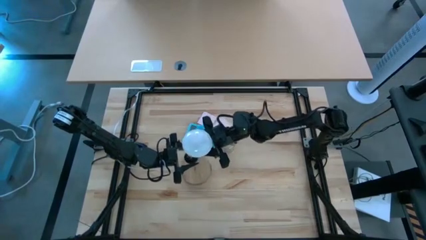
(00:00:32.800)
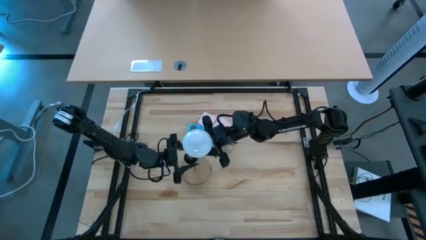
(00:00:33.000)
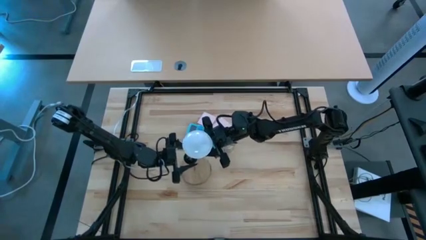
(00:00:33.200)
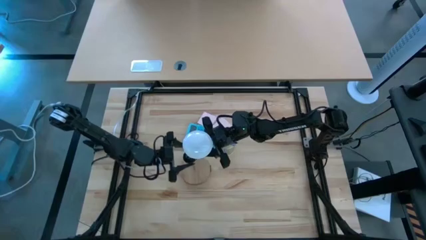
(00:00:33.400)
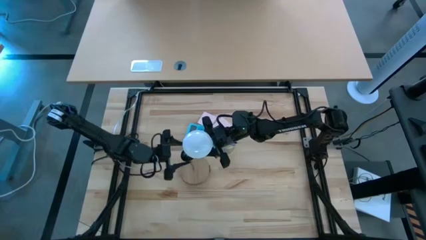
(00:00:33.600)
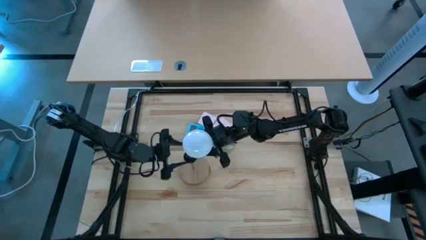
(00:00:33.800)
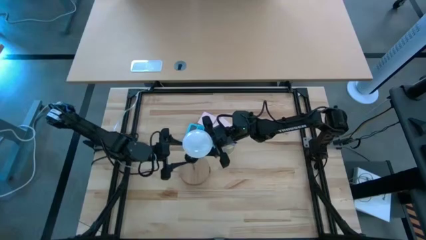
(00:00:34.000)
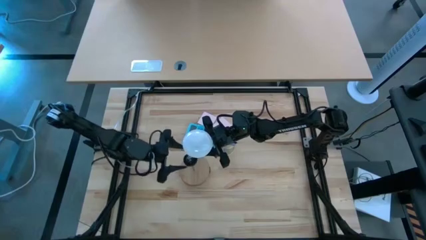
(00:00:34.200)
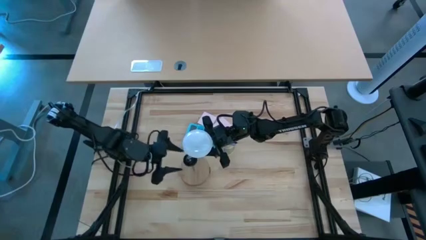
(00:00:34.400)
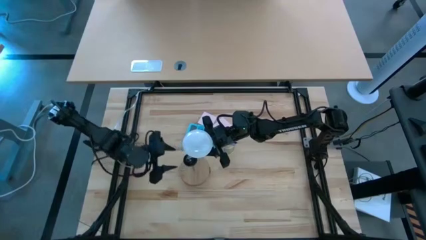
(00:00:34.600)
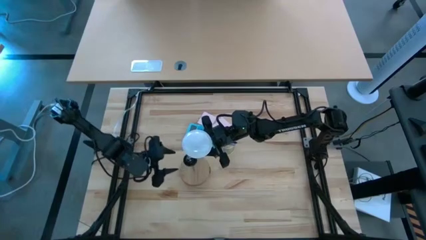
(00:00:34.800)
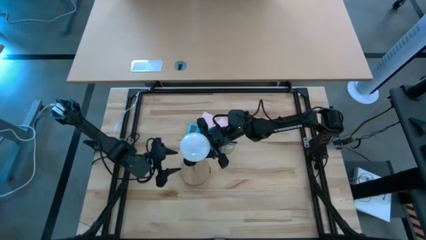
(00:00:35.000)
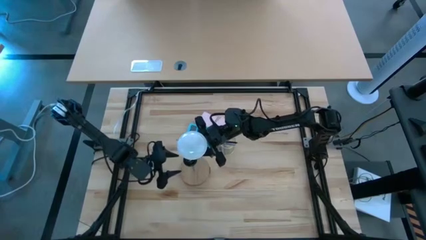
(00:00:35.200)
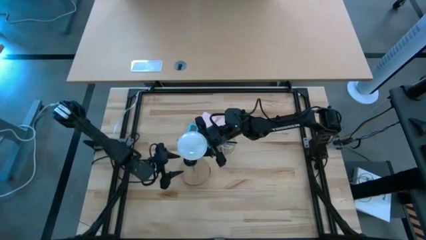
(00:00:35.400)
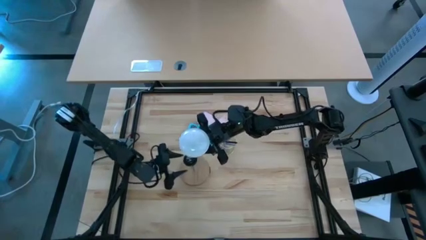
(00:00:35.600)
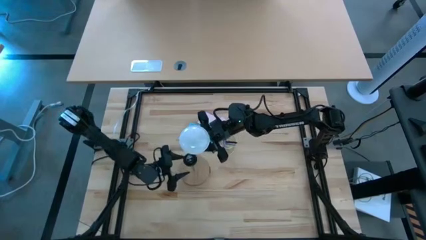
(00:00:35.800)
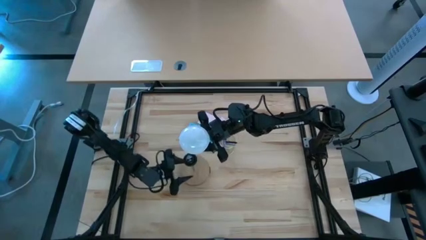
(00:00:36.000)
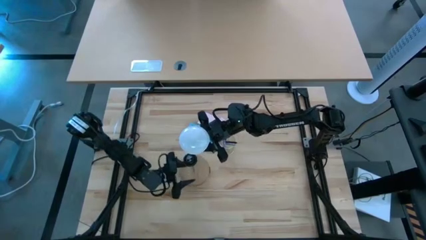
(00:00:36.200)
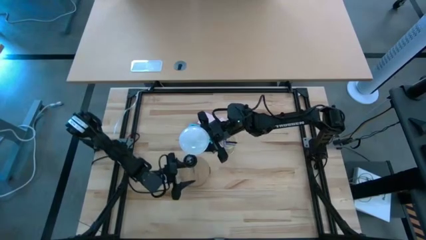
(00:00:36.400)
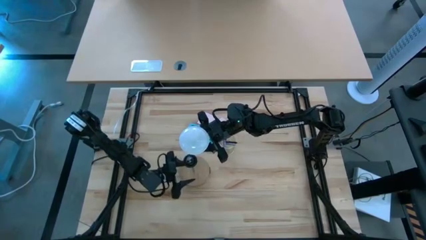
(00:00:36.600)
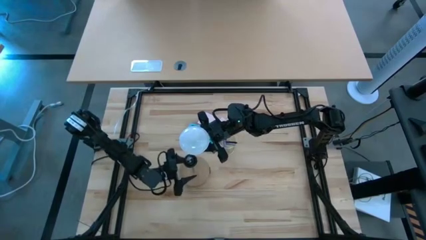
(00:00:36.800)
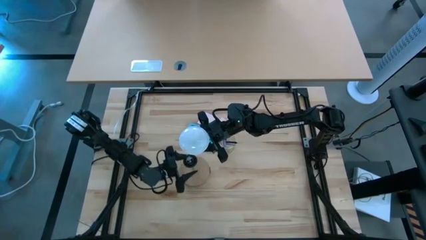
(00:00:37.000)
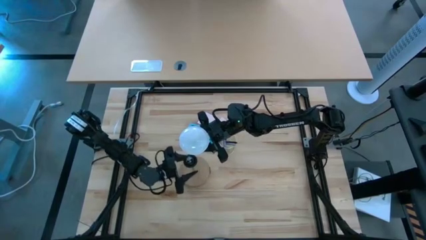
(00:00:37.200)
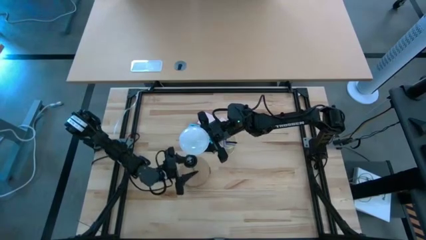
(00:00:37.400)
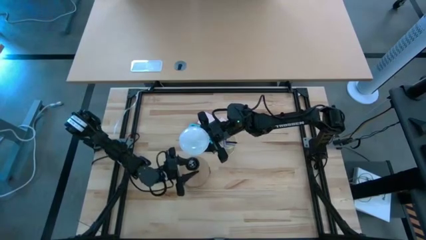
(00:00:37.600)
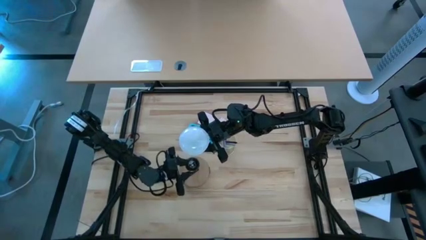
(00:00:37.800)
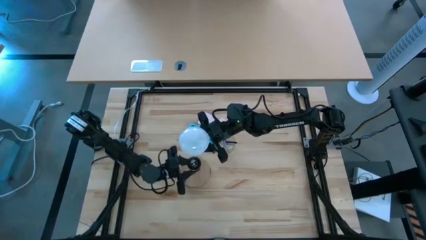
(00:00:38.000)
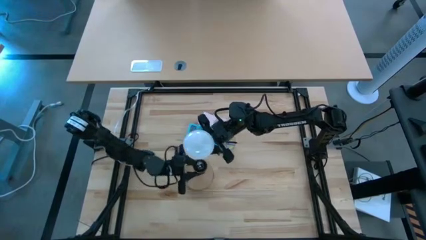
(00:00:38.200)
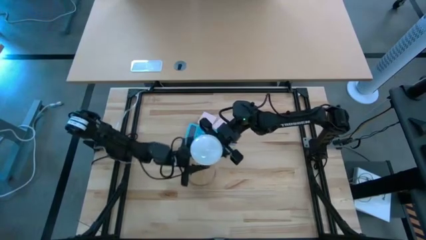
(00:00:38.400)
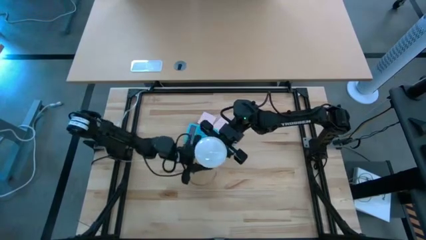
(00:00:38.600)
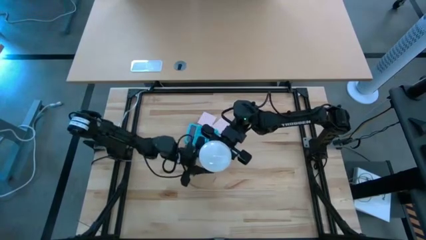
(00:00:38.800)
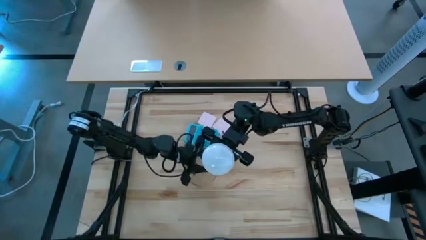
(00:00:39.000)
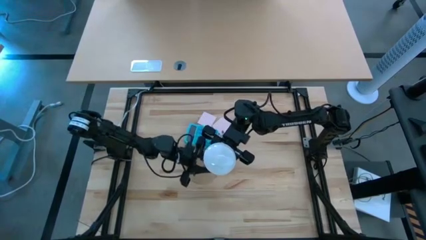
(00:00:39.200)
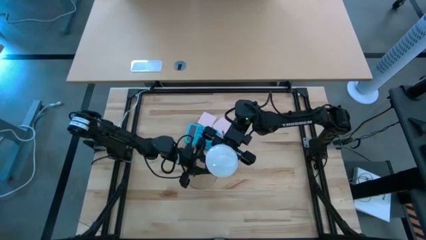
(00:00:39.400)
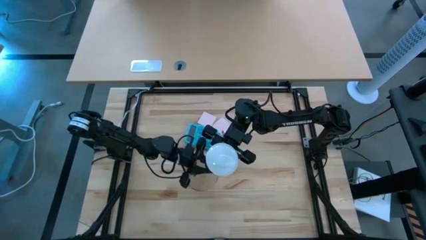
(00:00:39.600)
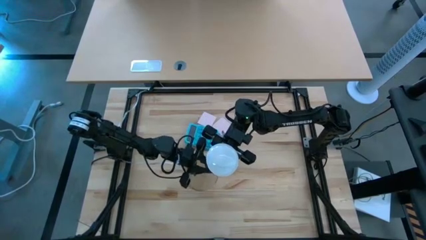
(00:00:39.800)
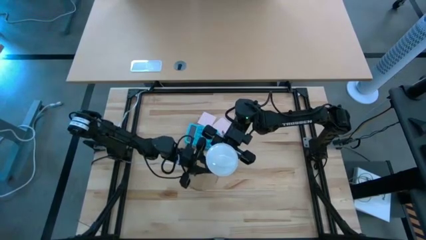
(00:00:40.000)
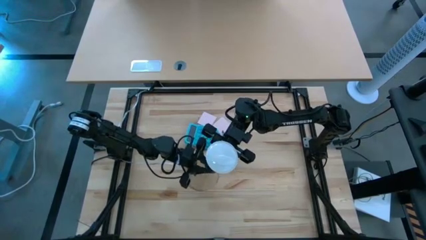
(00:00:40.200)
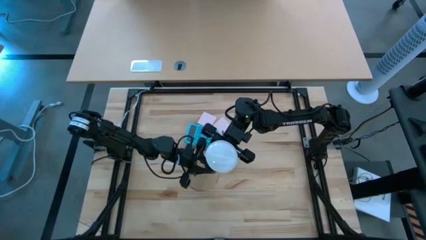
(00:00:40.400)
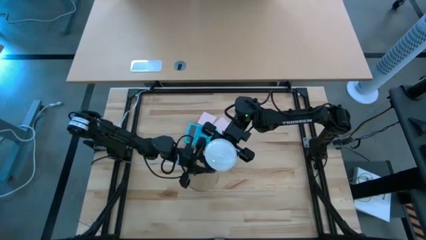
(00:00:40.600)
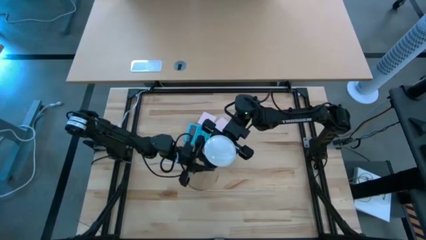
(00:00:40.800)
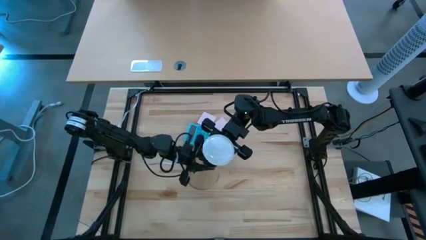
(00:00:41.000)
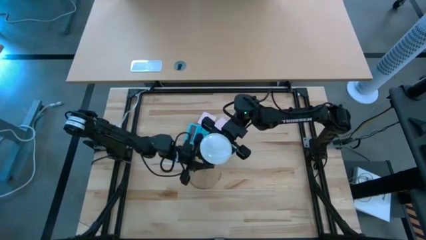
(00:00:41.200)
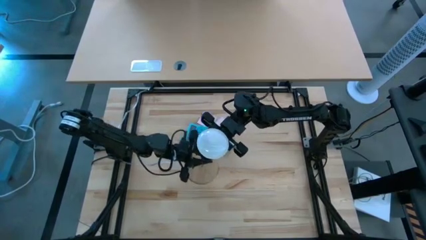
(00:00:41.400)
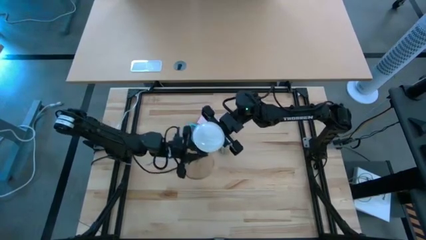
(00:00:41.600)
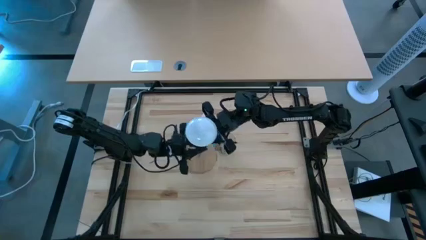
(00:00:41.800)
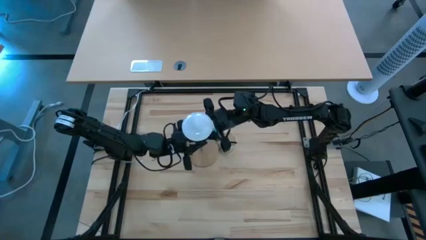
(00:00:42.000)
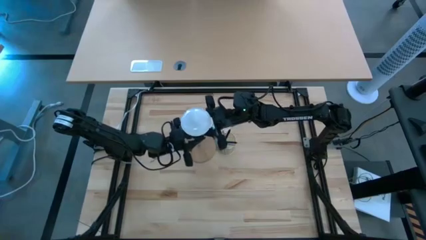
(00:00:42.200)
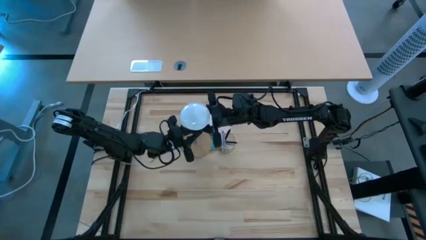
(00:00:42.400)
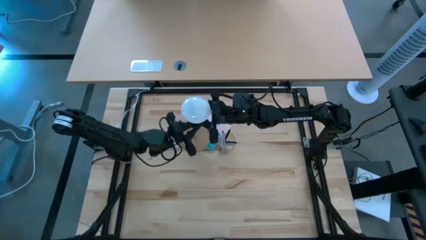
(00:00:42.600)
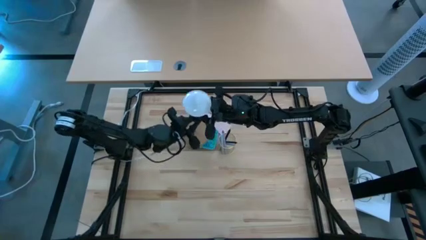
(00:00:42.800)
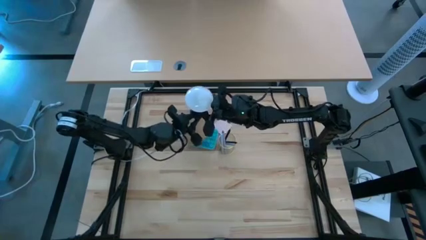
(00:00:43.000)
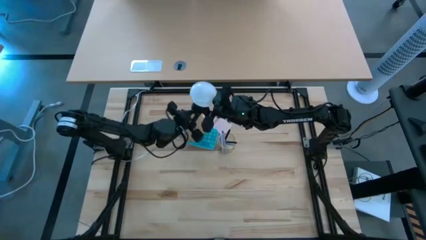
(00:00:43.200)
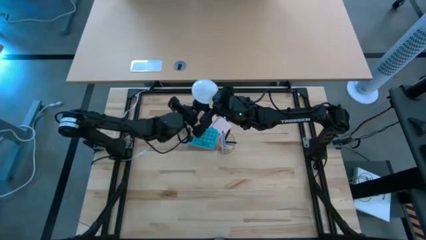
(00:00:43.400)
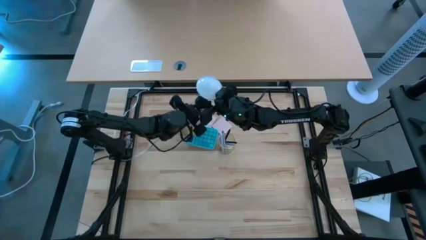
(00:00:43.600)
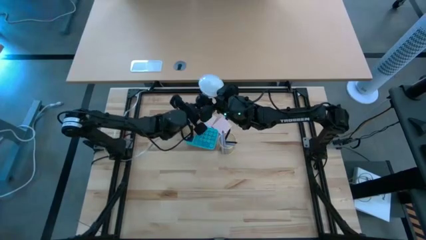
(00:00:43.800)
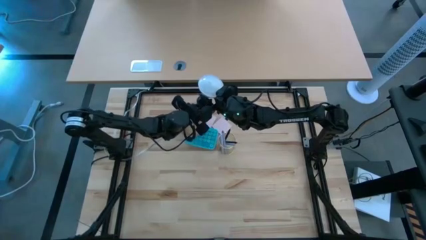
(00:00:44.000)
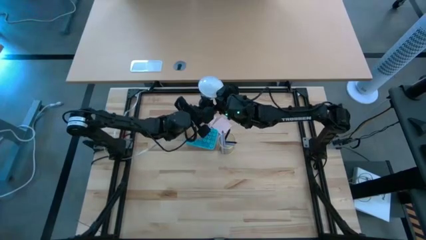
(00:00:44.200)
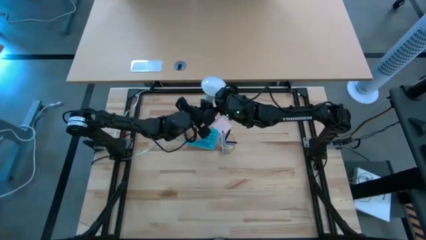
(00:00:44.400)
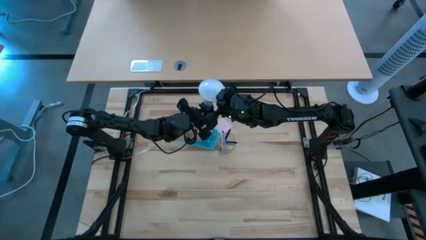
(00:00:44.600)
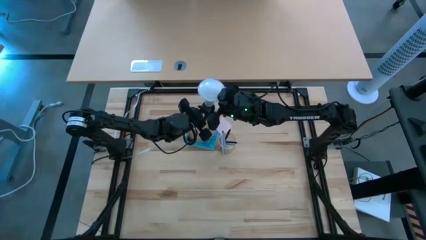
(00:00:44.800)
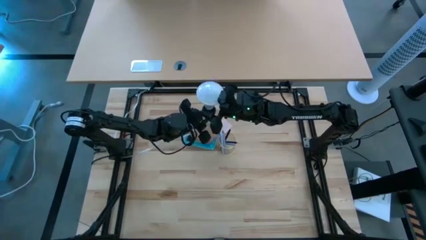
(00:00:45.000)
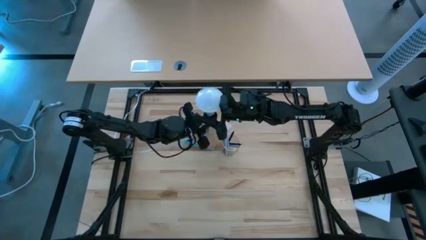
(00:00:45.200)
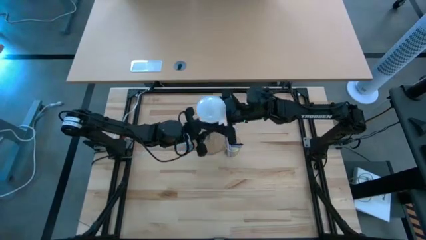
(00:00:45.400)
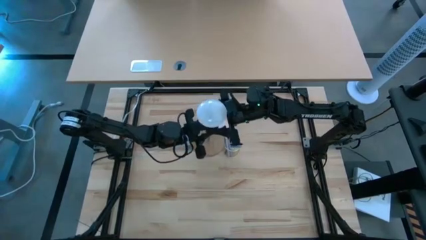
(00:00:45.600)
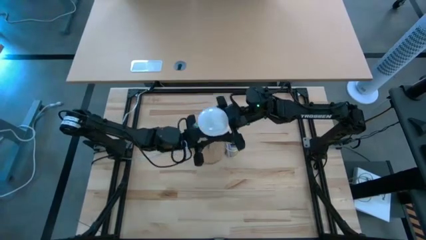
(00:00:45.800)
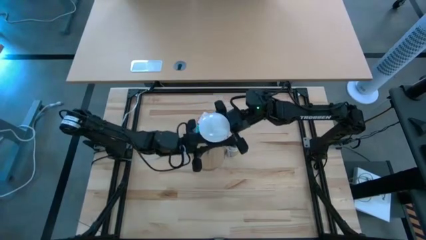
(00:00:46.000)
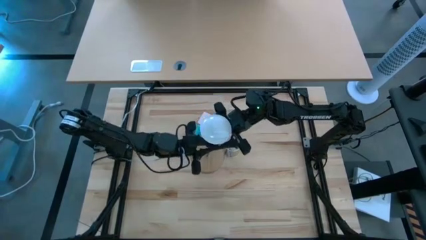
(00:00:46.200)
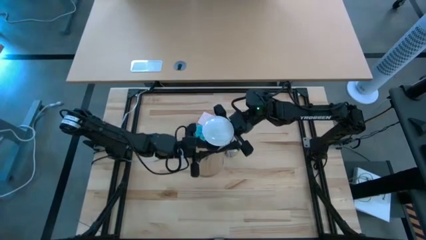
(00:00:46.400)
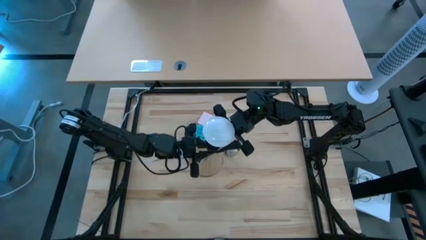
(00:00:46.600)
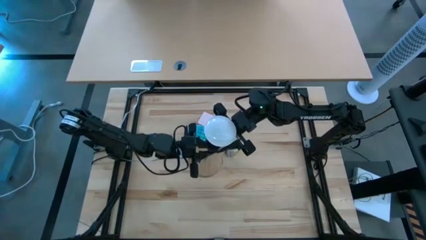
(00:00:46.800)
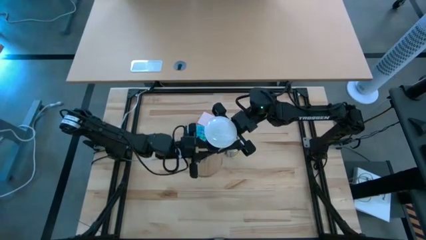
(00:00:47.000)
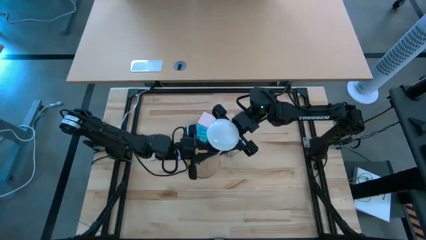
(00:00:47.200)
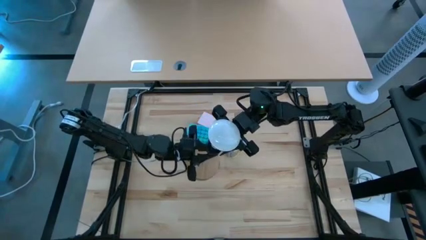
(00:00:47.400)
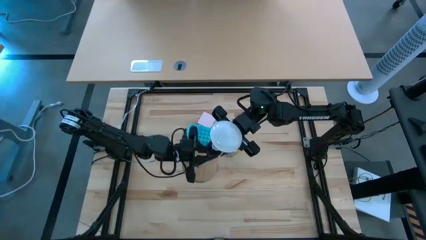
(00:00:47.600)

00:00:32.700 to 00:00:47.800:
Task: Screw lightbulb
Insert the lightbulb into the black table lamp

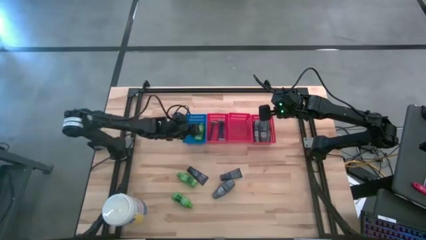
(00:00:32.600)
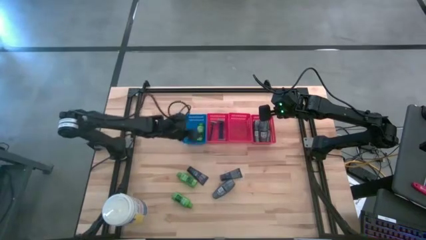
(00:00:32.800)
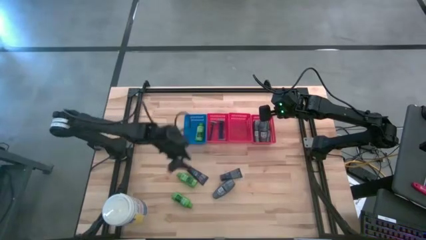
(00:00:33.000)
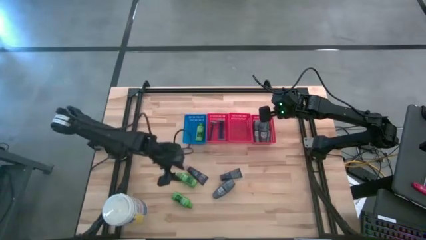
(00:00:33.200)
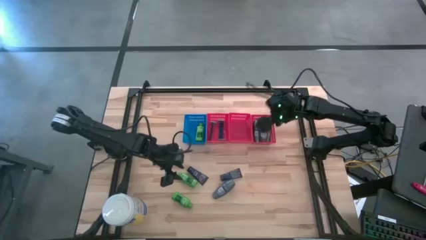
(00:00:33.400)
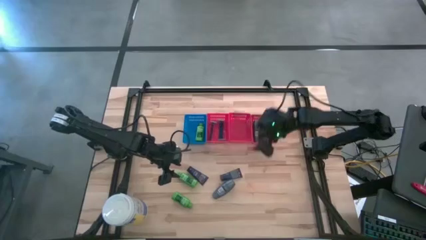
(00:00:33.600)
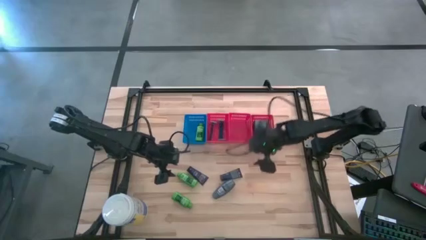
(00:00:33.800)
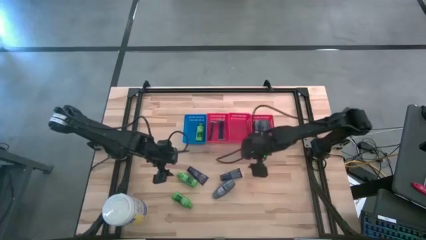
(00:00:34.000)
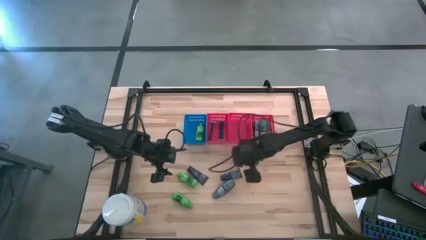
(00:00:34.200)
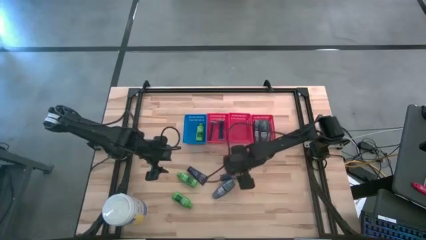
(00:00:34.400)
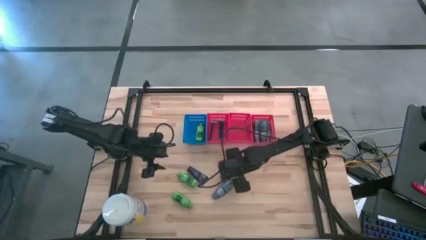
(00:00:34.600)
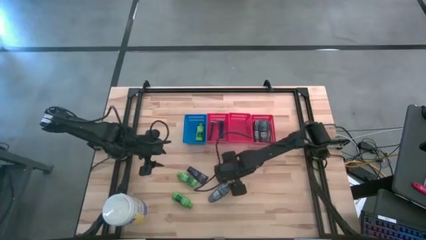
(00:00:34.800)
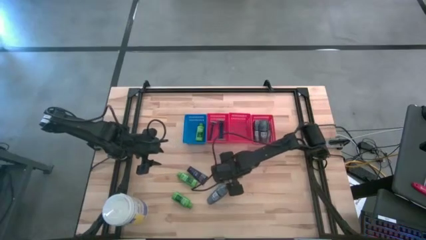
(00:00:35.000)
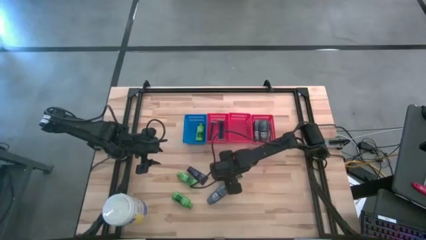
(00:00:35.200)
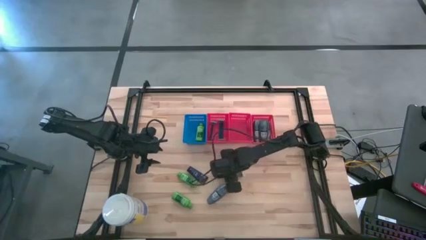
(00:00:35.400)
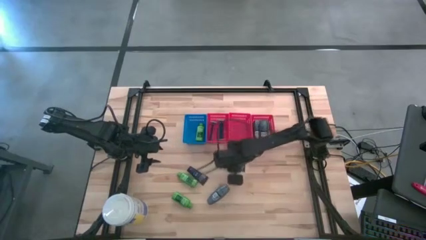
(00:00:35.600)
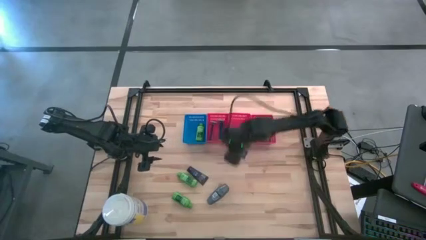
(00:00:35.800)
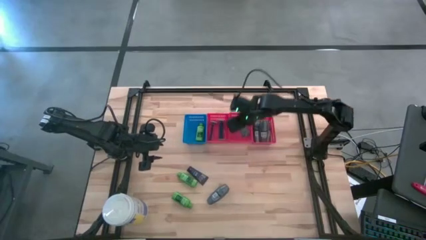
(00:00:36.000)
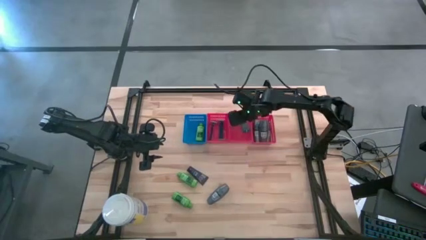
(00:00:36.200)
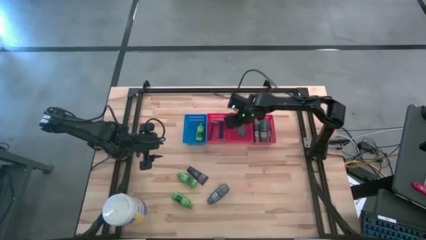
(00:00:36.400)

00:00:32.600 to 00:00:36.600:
Task: Pick & Place Travel size toiletries
Put the black shave cream into the middle red bin
